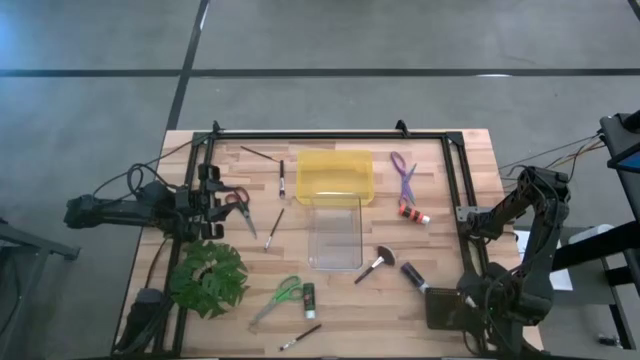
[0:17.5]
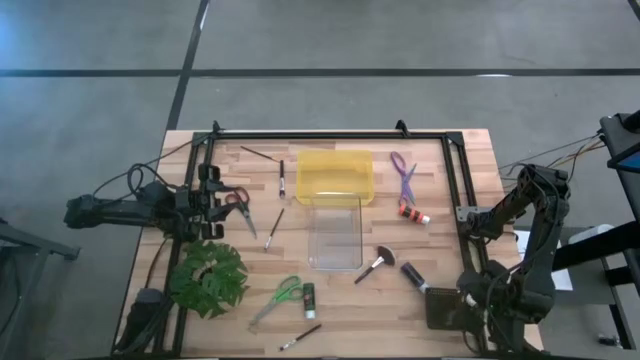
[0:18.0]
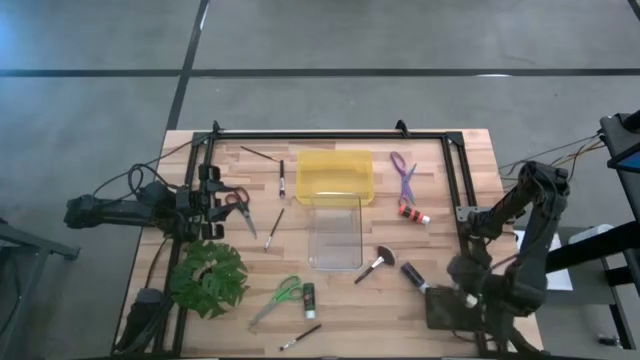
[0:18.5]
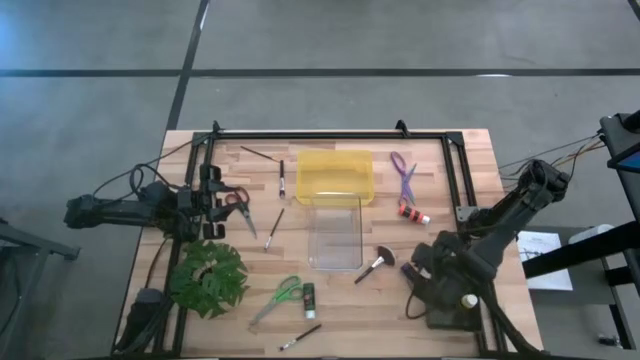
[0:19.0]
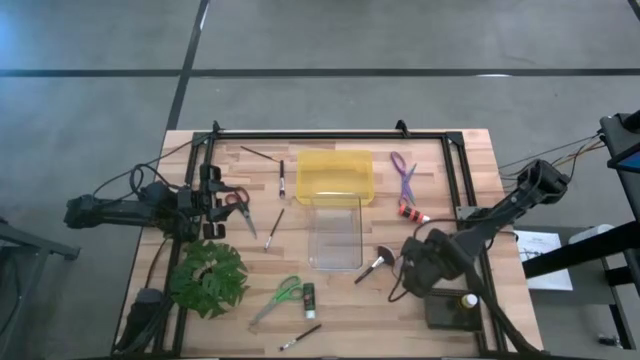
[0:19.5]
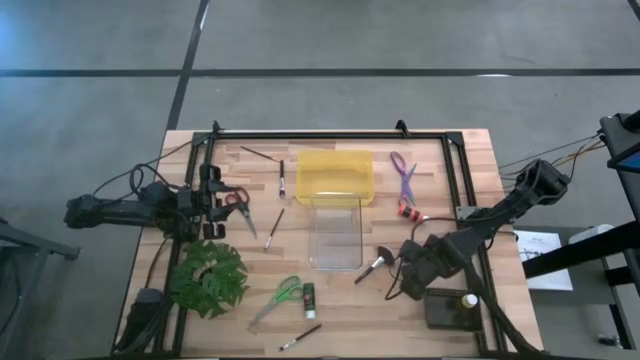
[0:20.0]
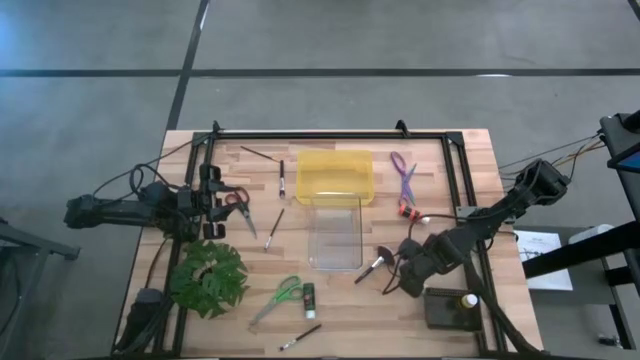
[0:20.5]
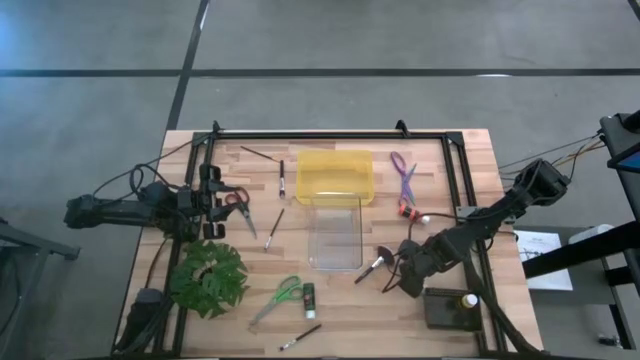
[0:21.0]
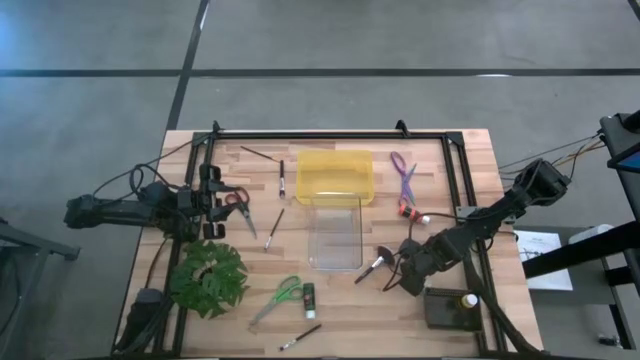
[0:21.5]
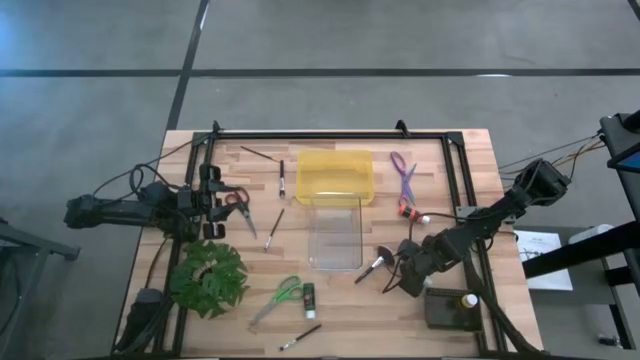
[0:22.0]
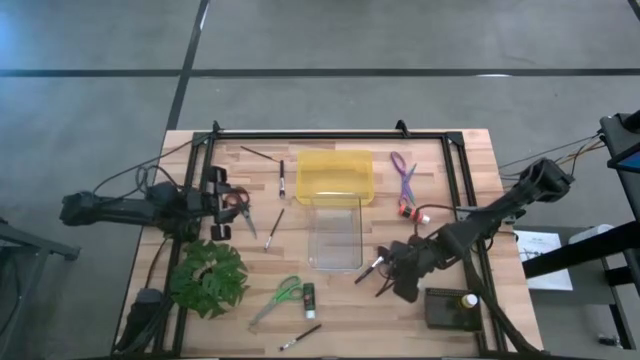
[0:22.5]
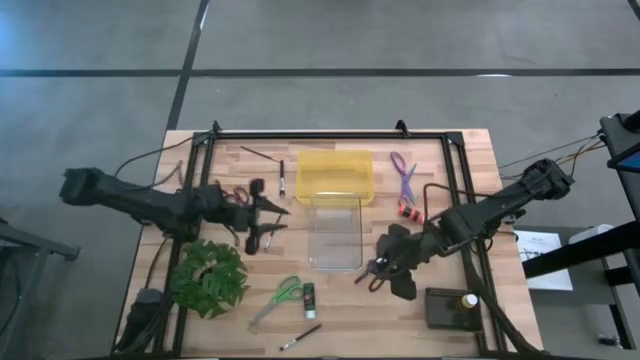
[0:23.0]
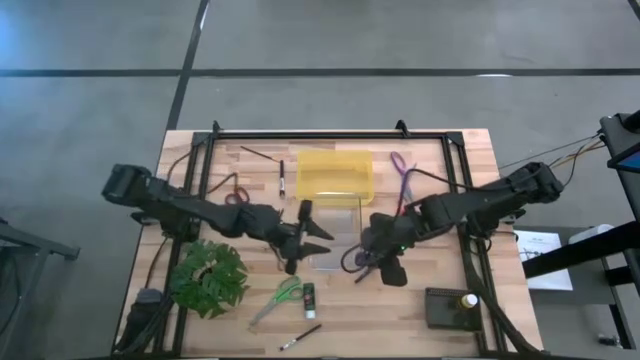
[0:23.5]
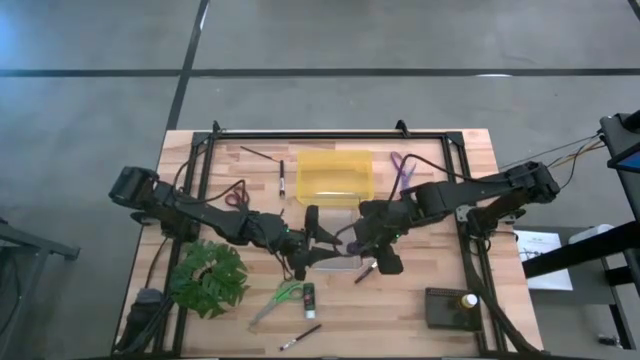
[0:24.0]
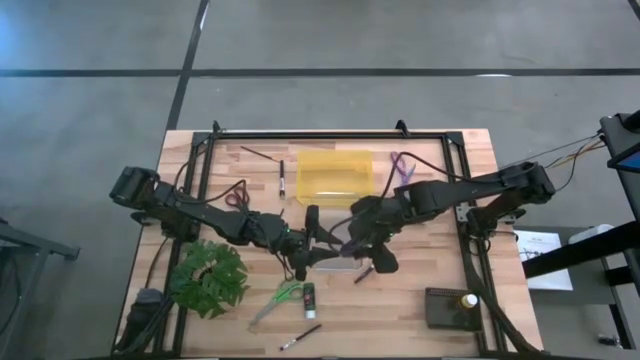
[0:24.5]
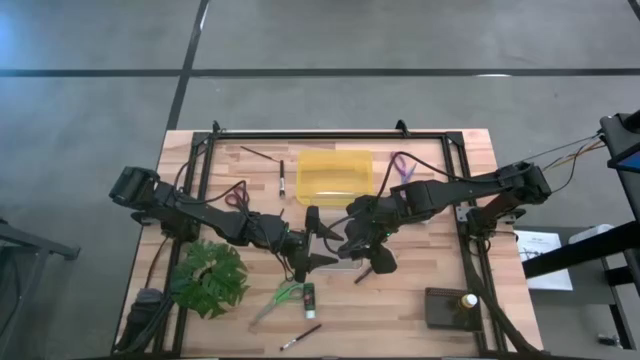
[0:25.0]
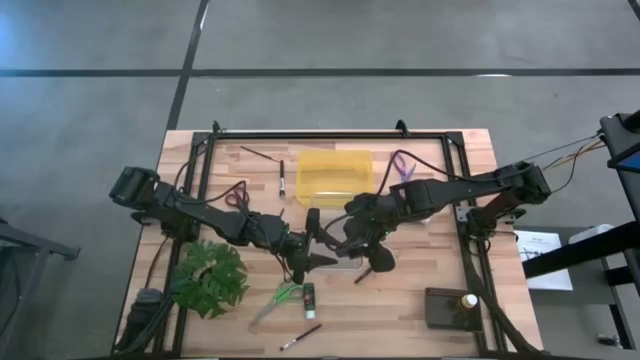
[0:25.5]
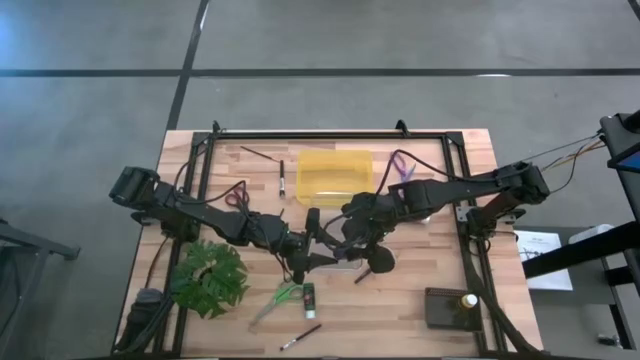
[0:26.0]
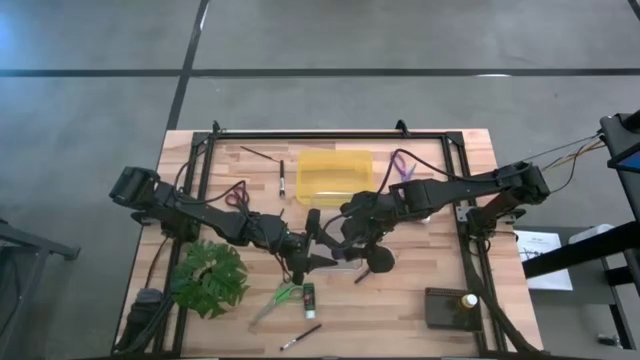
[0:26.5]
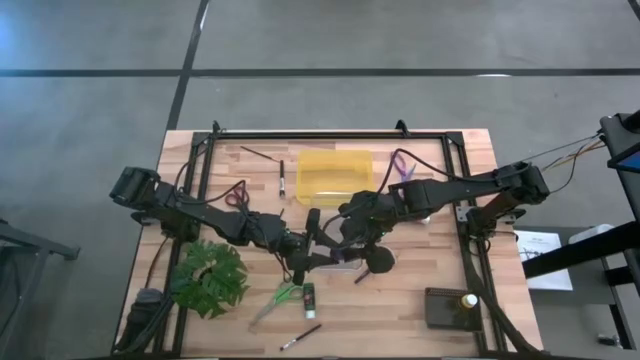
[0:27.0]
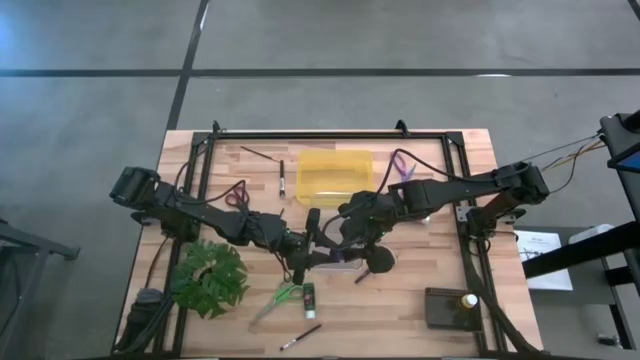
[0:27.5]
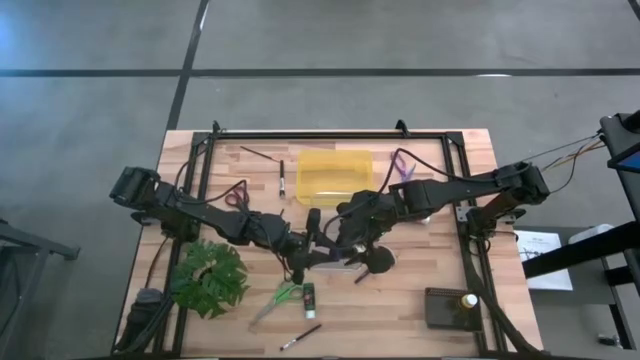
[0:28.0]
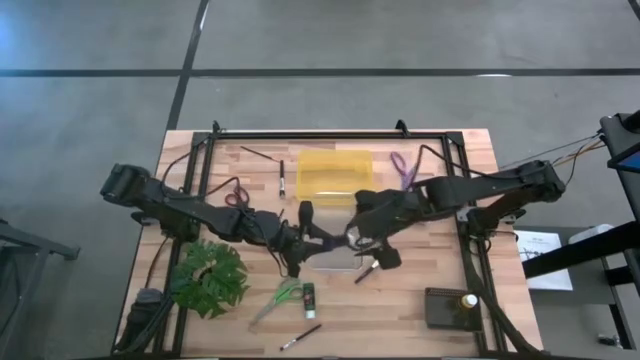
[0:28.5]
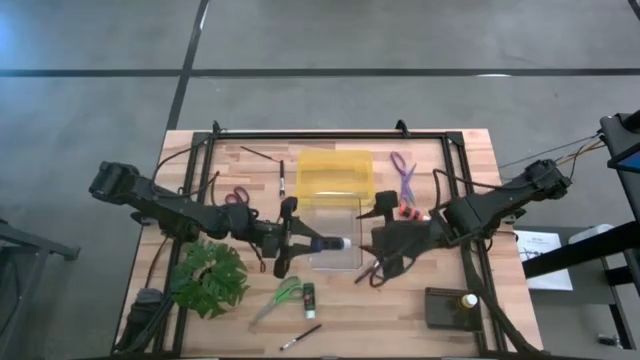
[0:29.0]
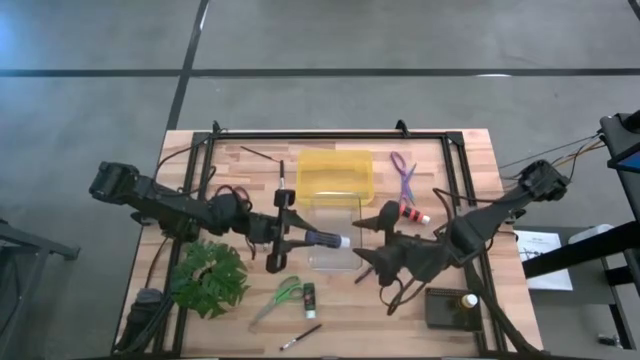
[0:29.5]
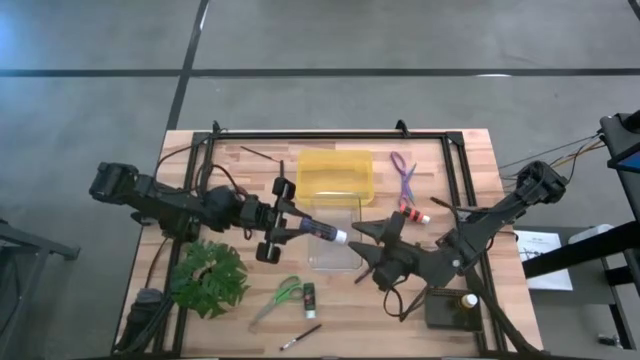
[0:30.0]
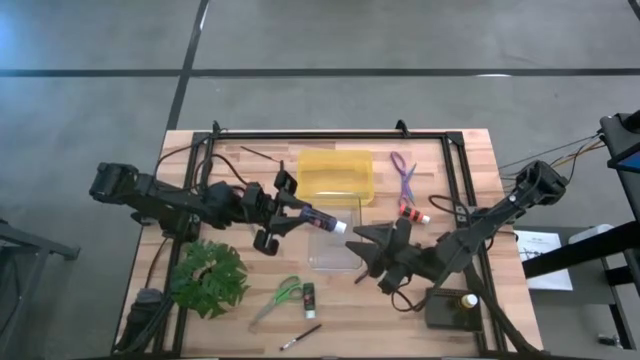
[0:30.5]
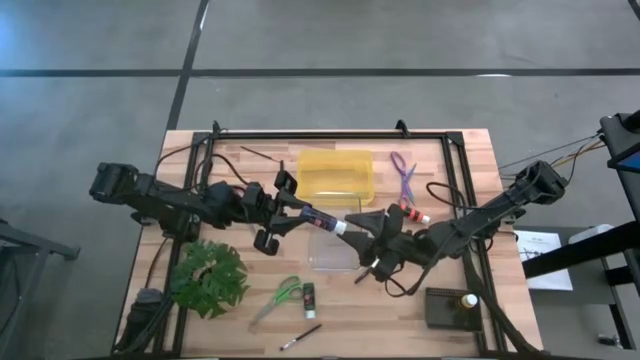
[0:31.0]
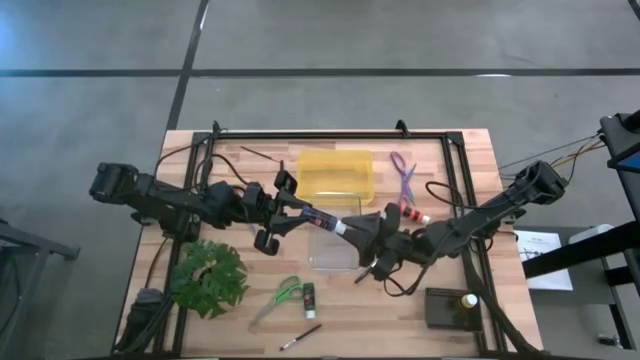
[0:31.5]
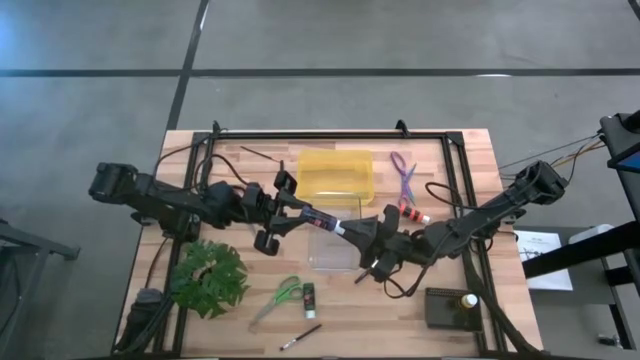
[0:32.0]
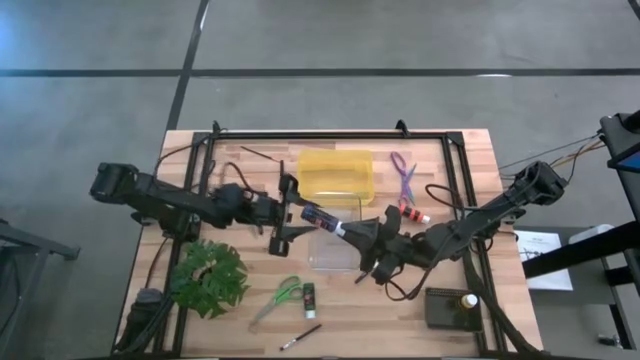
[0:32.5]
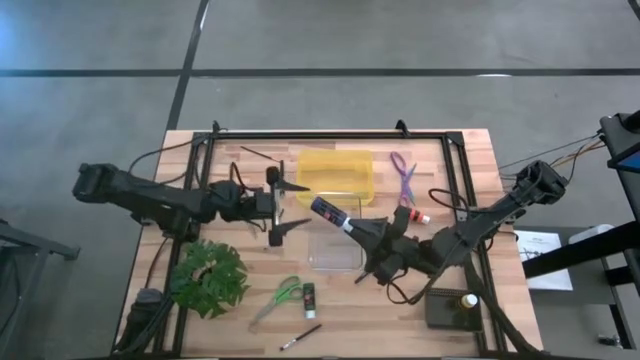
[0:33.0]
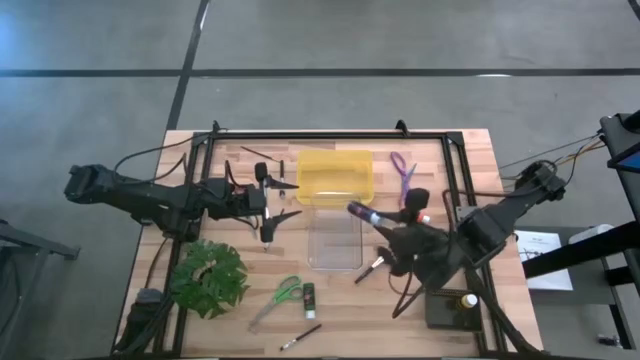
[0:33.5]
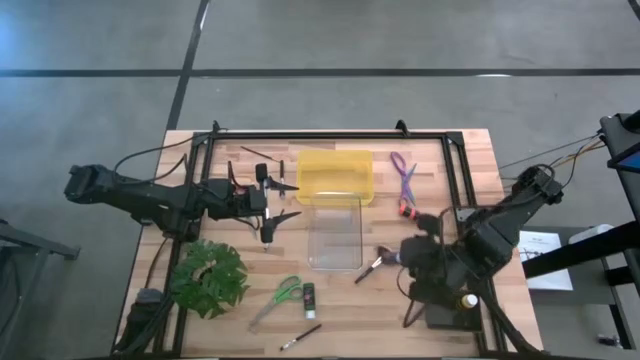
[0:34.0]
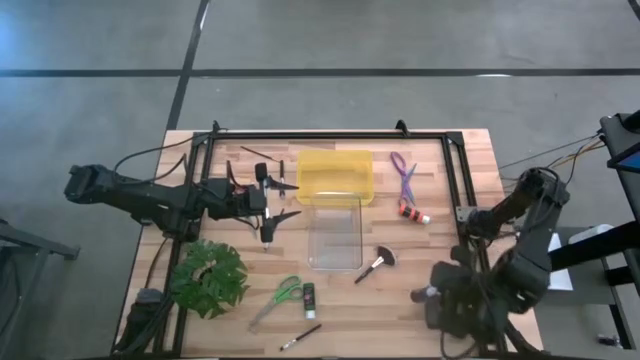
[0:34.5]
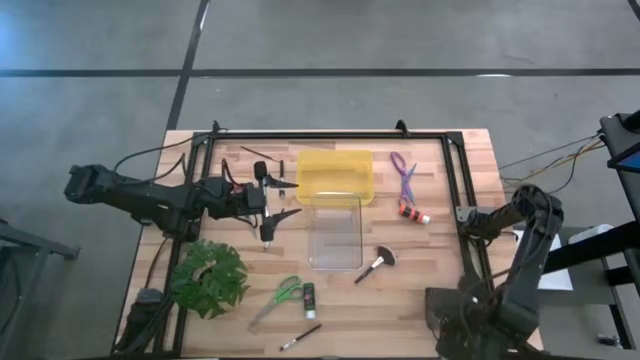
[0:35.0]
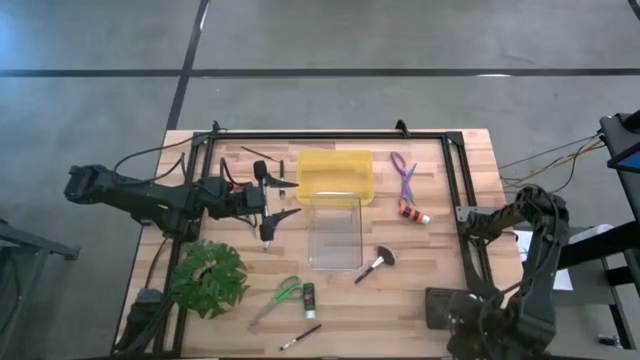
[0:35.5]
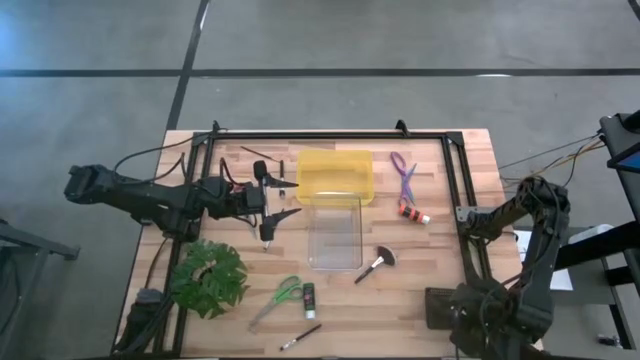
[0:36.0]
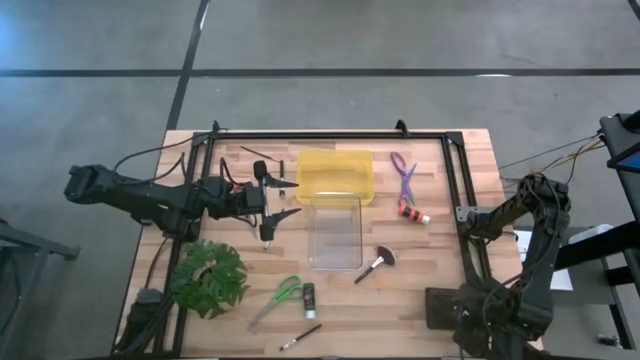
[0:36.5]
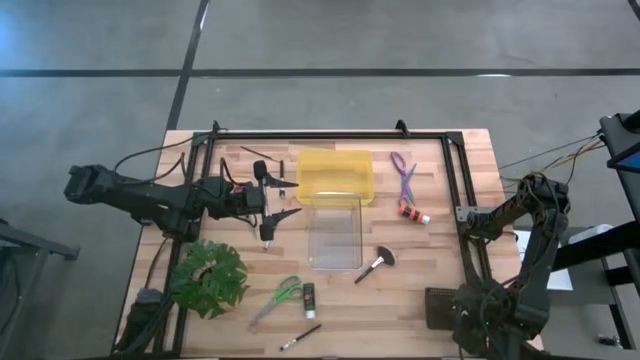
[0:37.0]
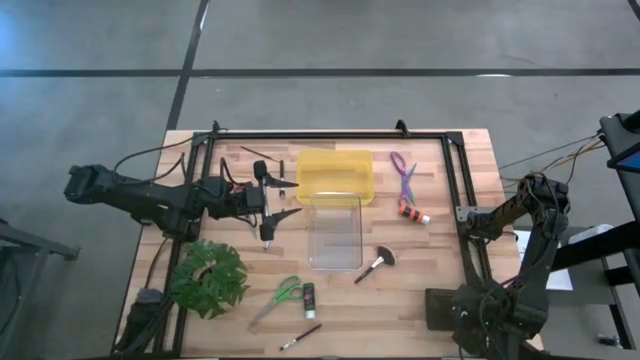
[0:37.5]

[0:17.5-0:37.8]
Task: Pick & Place Paint Supplies
Put the blue paint bottle into the black bin
